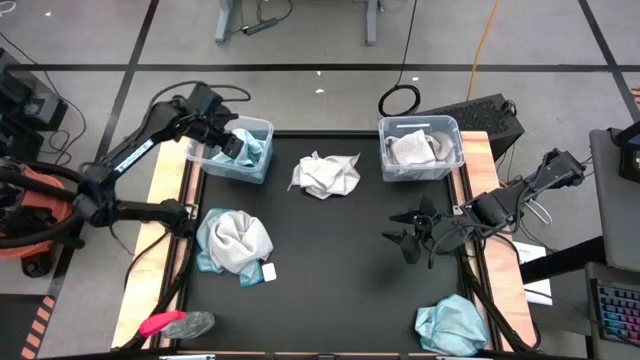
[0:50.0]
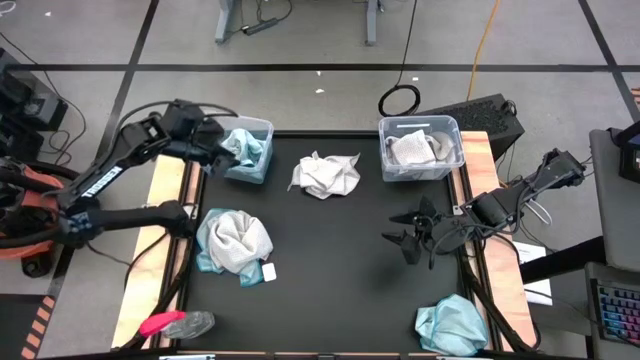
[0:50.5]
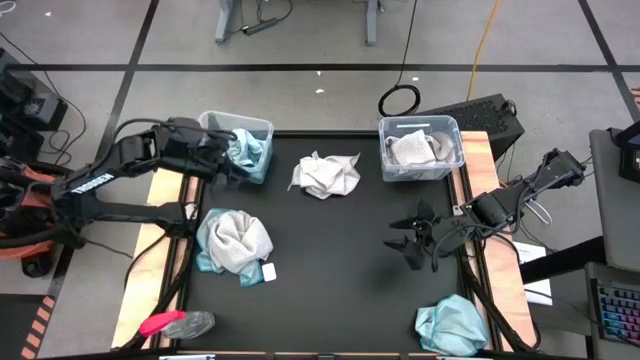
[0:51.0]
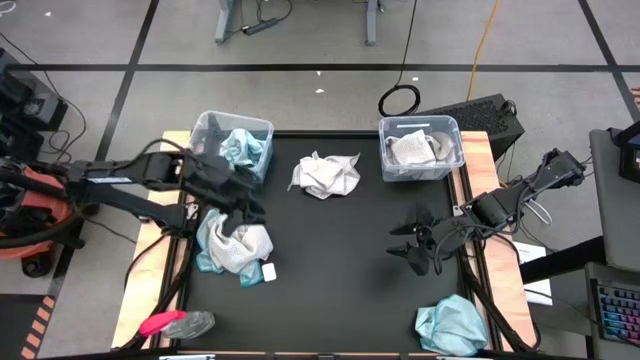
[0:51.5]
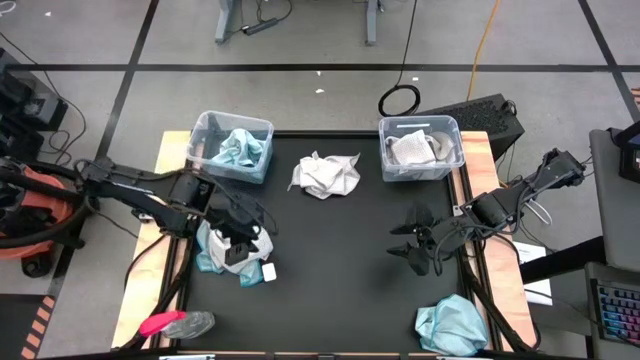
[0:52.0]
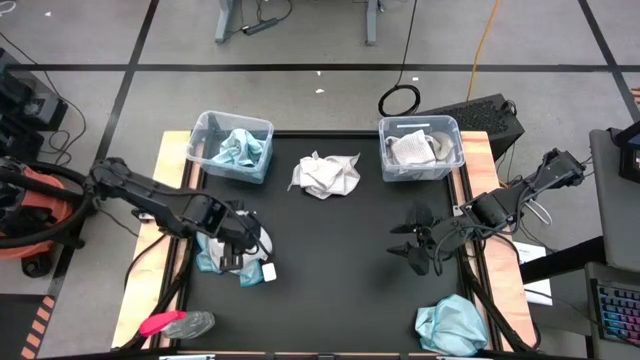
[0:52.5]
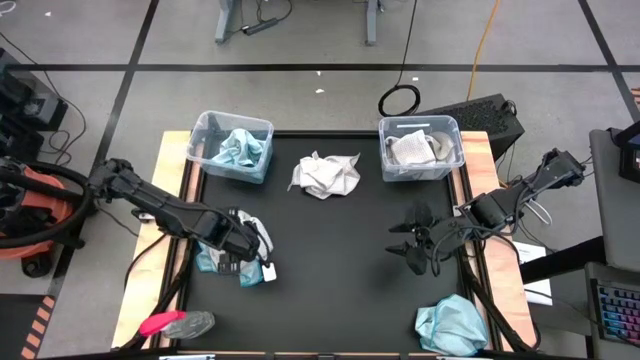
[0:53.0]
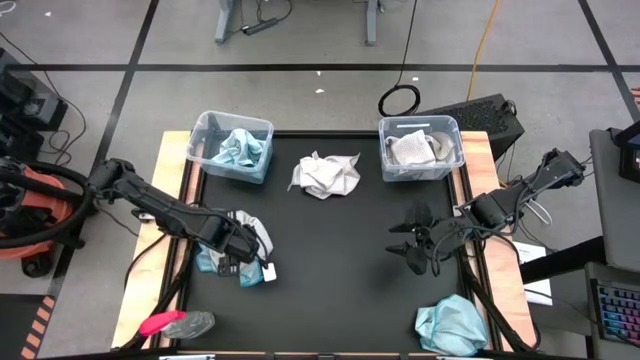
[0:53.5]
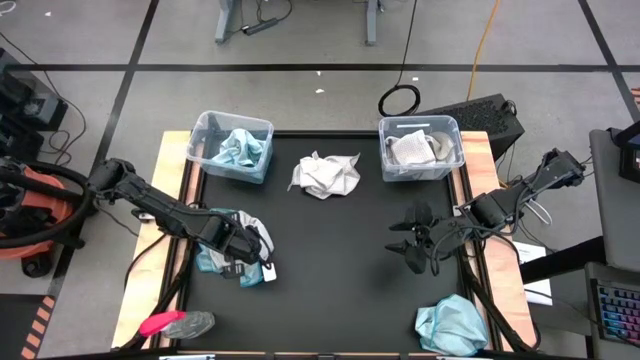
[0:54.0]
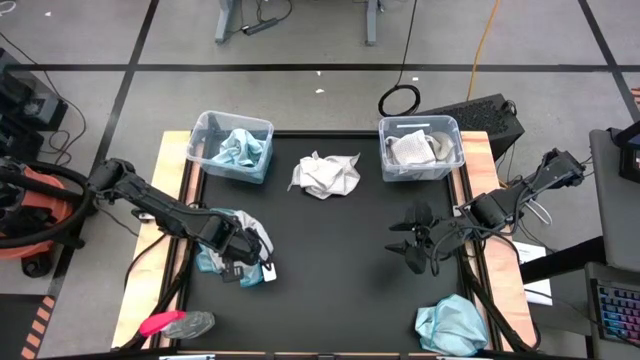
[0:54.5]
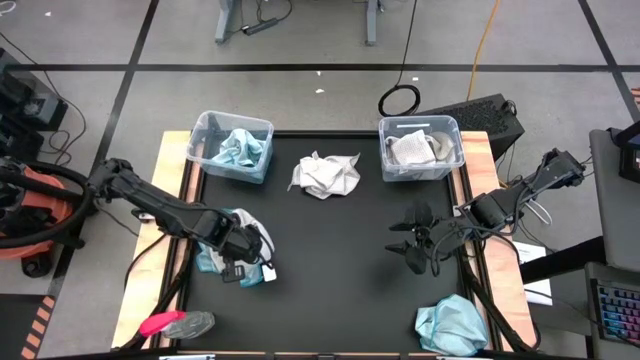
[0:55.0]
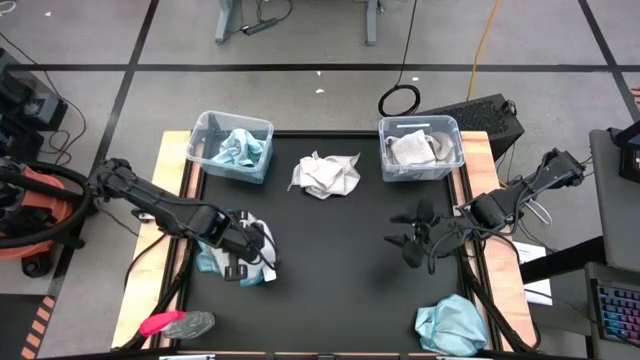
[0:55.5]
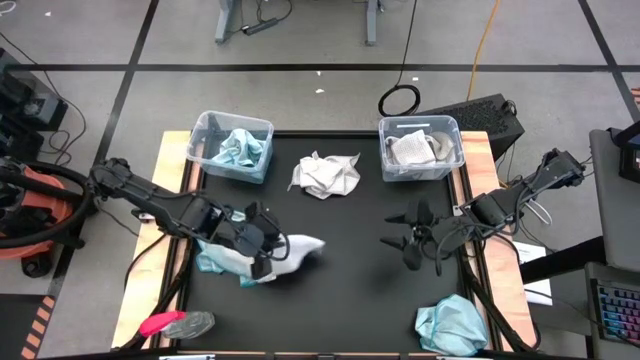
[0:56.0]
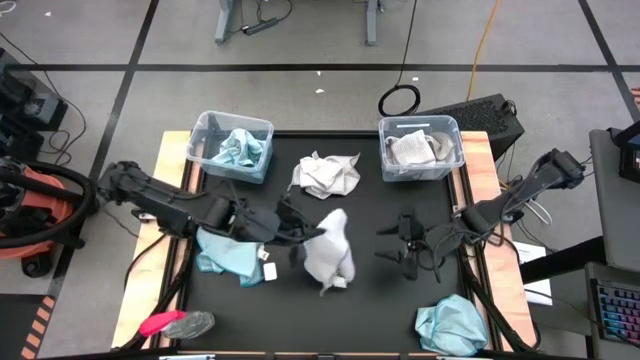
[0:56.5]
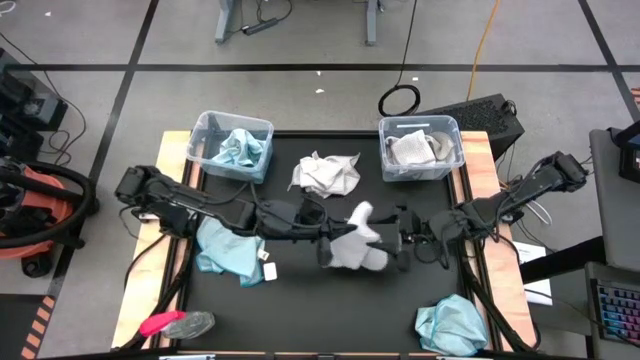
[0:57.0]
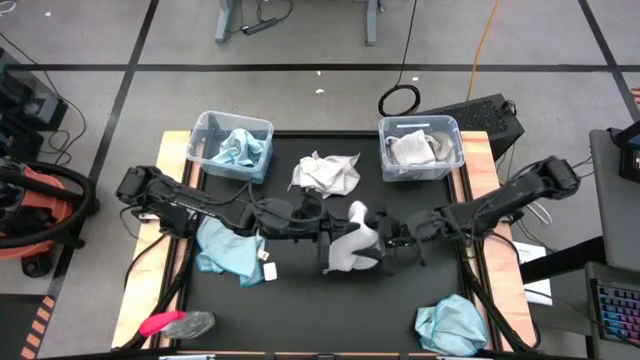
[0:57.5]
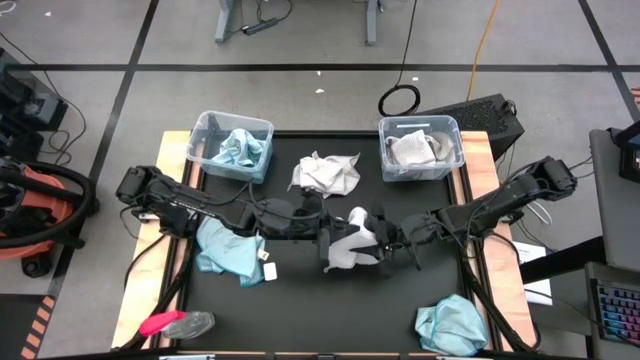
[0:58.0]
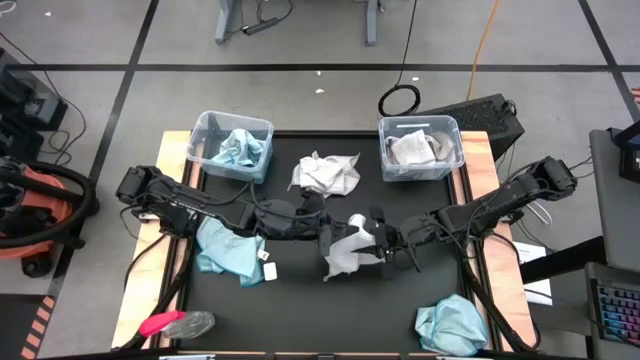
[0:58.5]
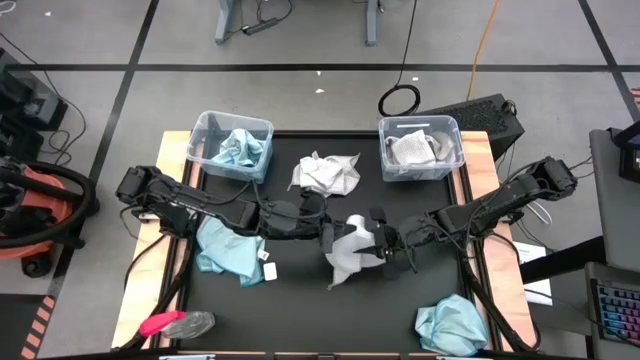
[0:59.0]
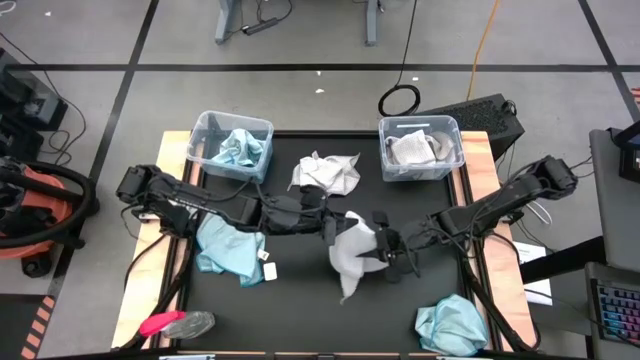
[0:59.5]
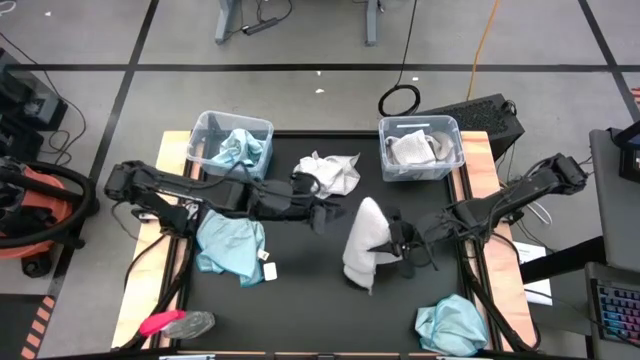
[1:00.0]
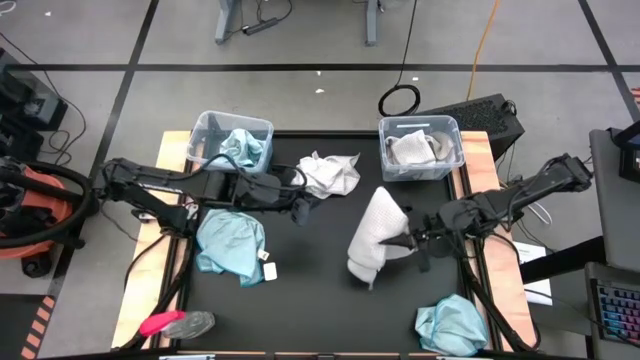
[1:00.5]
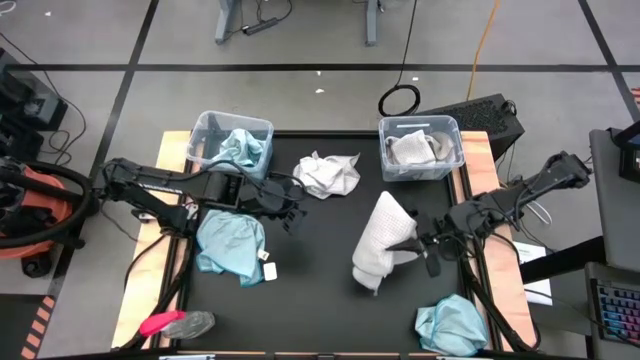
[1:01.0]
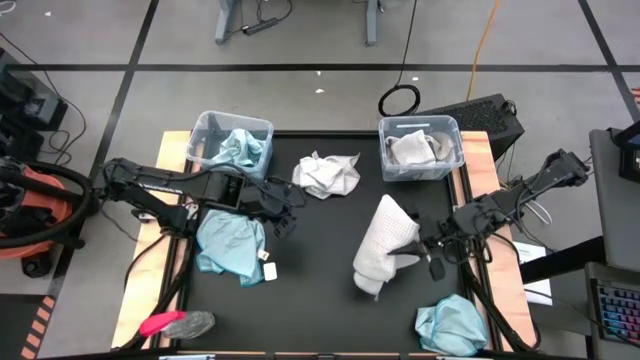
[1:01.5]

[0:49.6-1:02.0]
Task: Sort microfiber towel by color & place in baskets
Put the gray microfiber towel into the right transparent bin

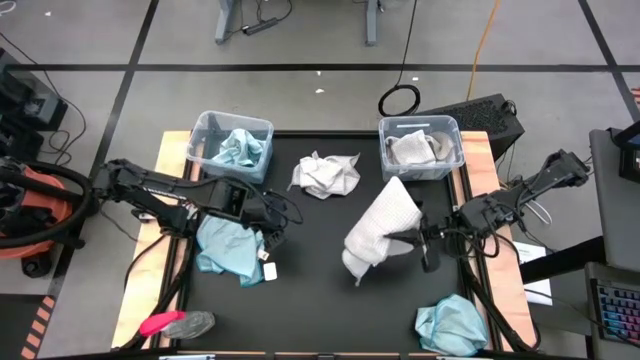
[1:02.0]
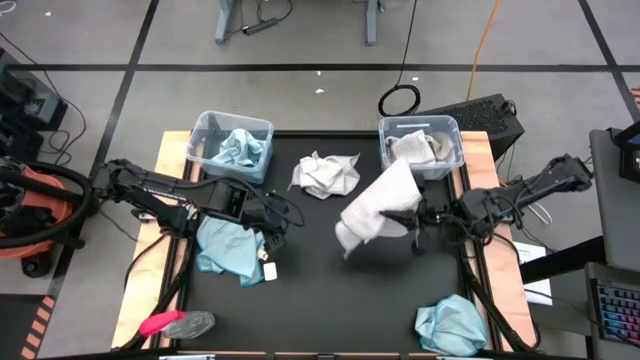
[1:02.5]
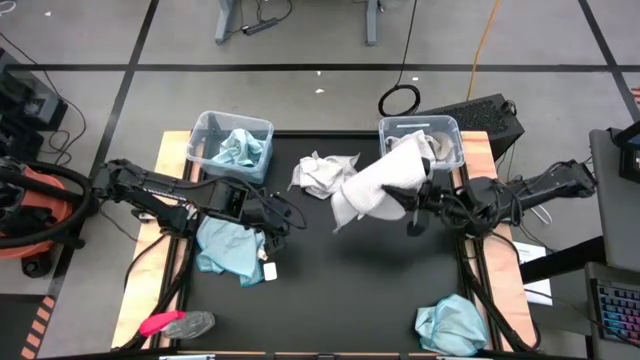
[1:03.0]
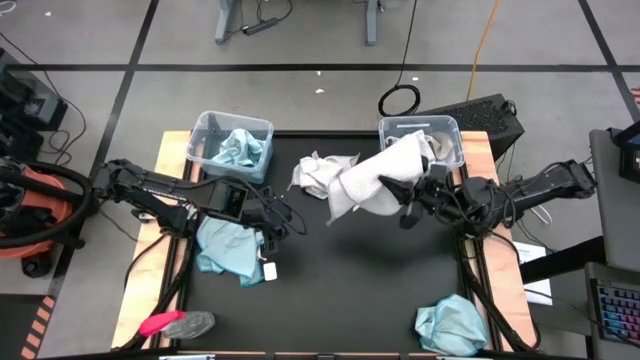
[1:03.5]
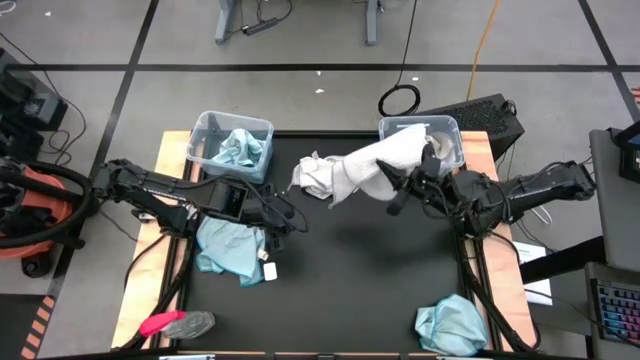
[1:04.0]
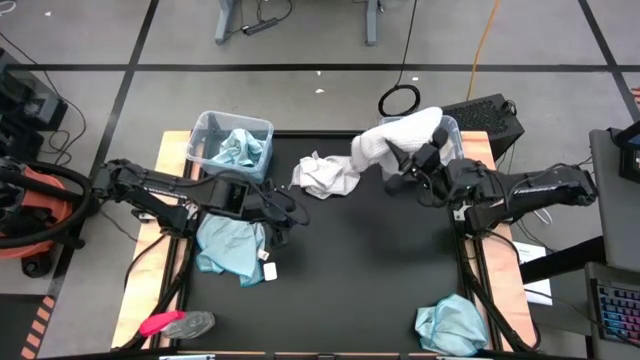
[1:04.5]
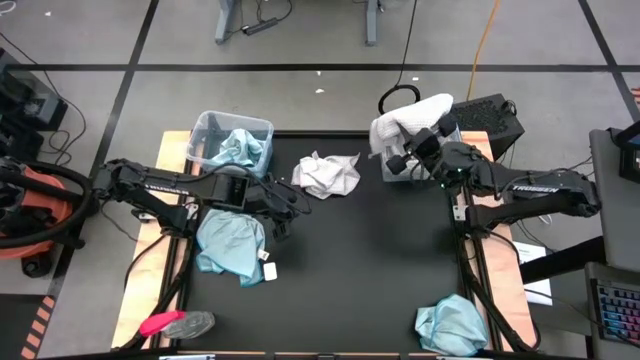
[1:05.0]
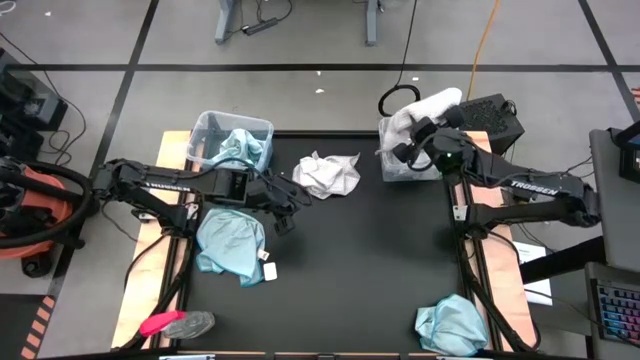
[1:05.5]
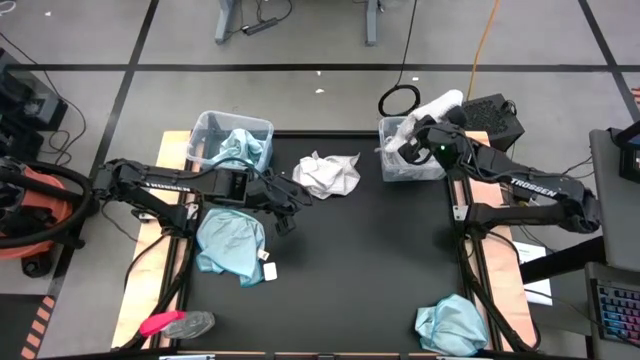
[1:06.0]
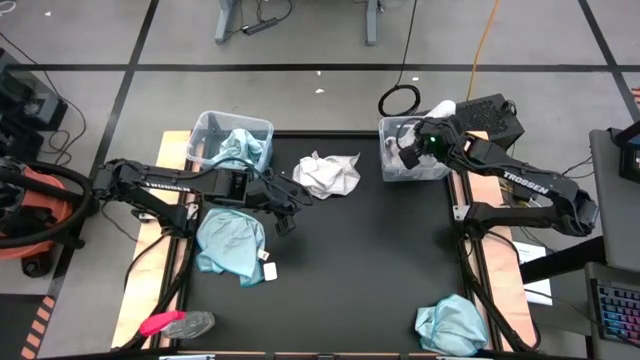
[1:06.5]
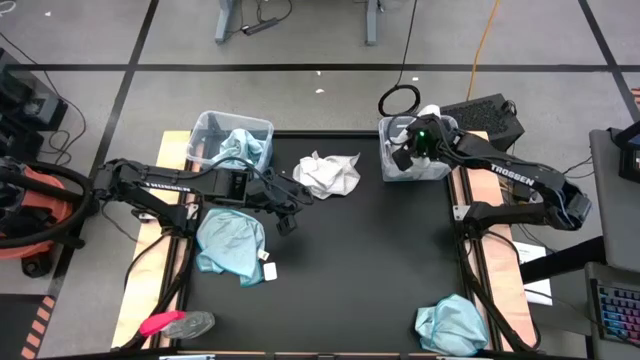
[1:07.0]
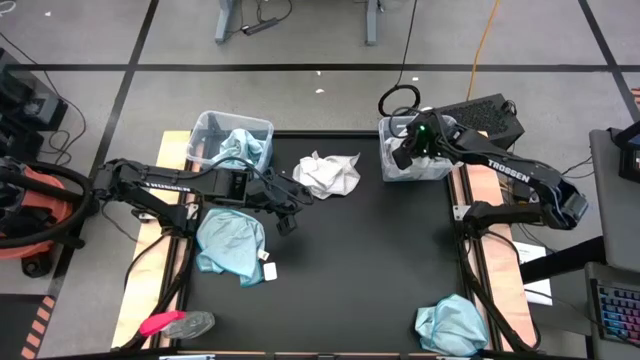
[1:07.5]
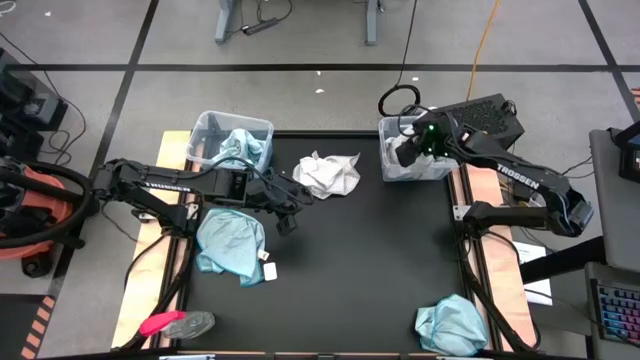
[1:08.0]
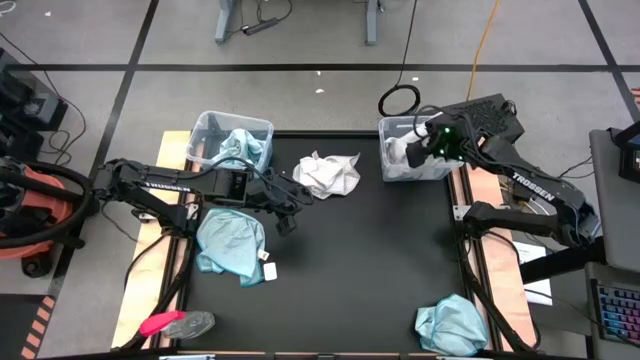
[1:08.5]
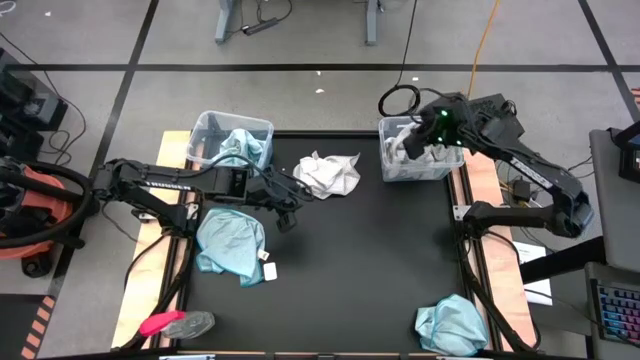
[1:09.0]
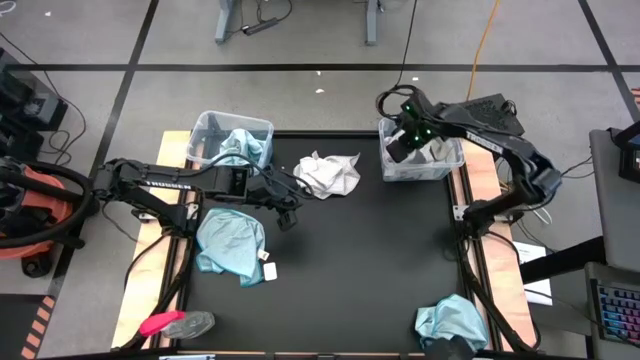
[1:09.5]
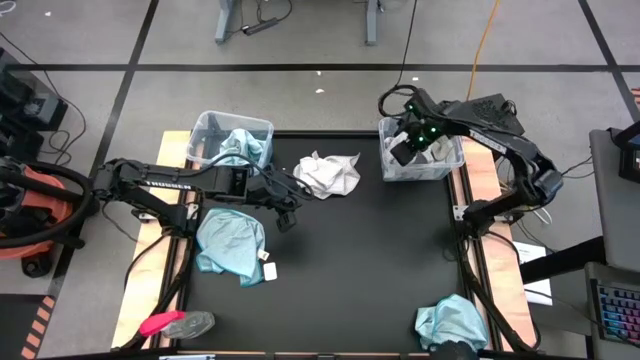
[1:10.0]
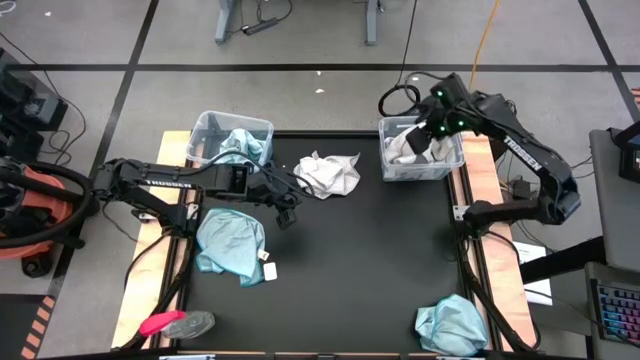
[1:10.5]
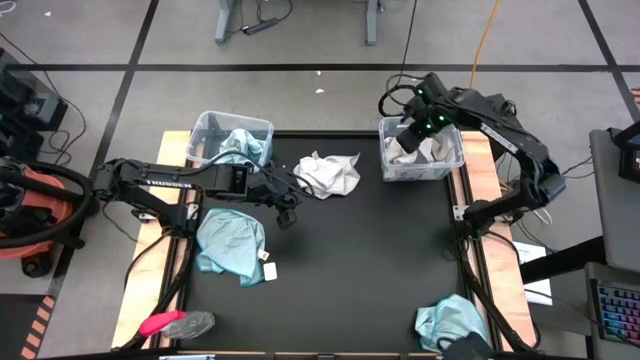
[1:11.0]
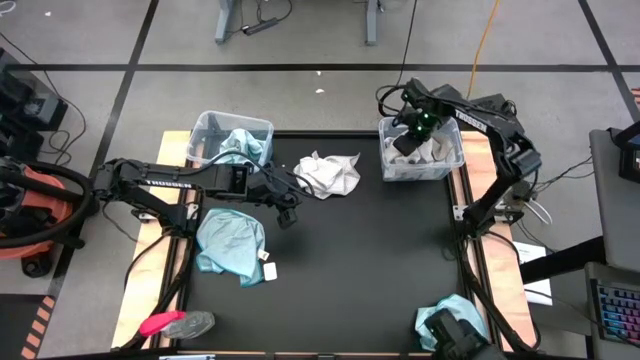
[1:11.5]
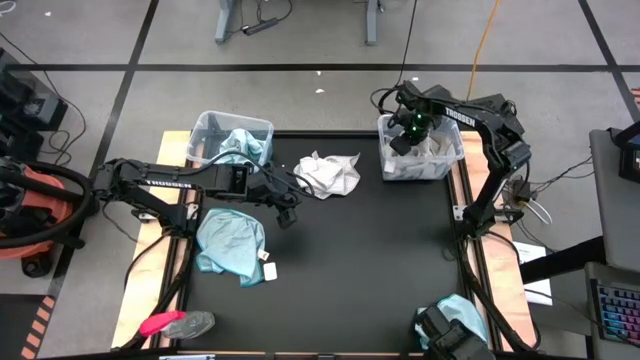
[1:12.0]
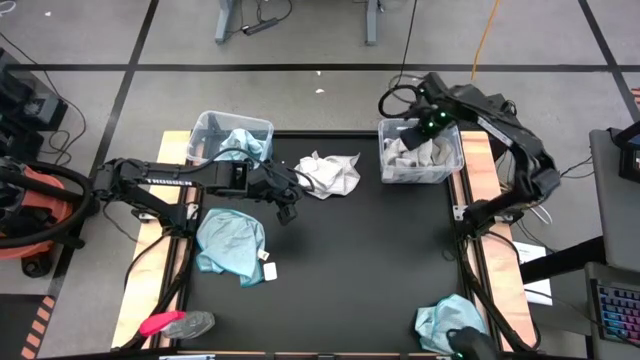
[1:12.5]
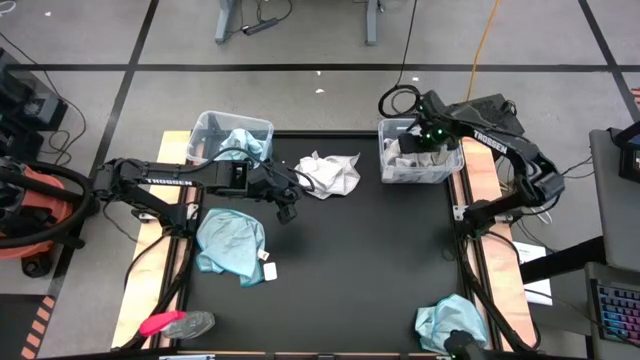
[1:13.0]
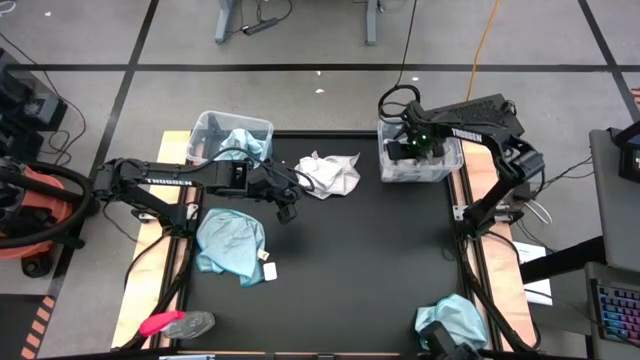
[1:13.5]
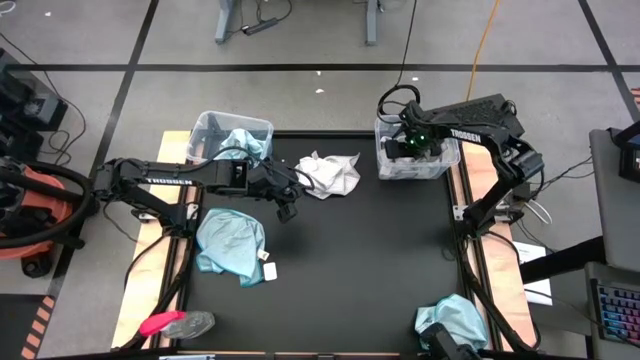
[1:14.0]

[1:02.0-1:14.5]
Put the gray microfiber towel into the right transparent bin
